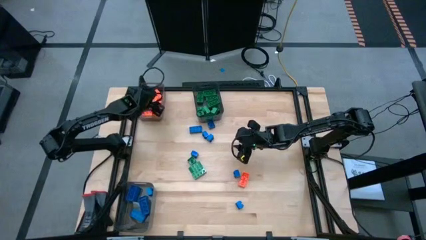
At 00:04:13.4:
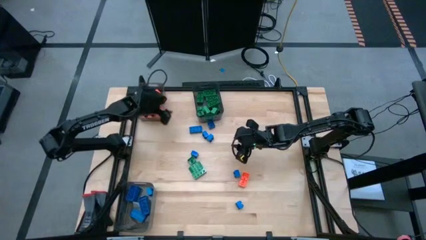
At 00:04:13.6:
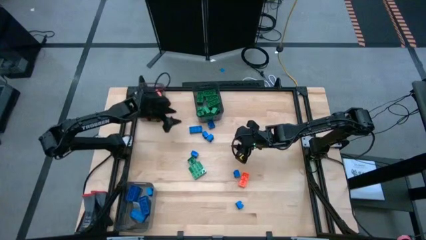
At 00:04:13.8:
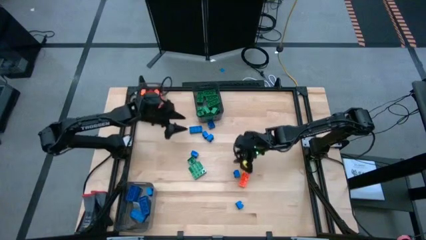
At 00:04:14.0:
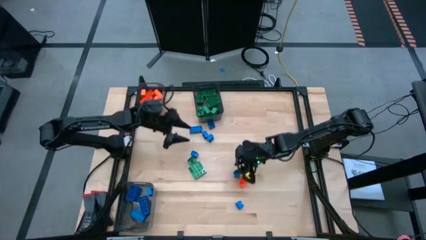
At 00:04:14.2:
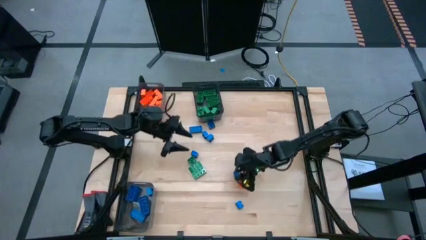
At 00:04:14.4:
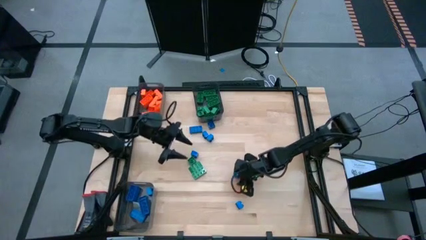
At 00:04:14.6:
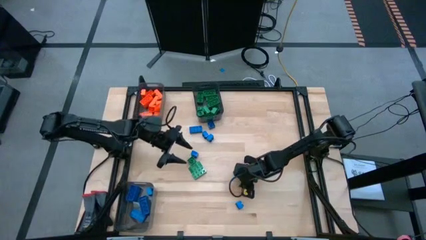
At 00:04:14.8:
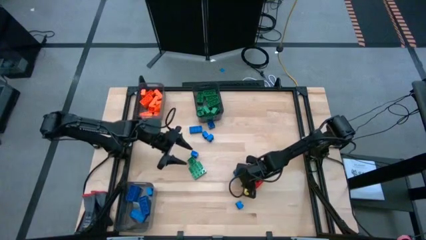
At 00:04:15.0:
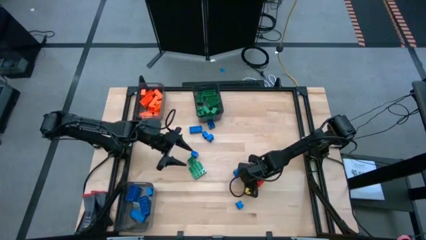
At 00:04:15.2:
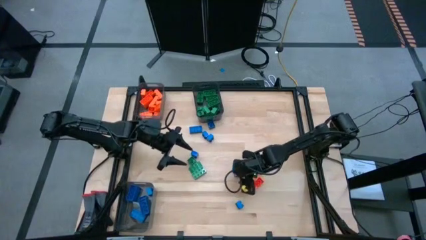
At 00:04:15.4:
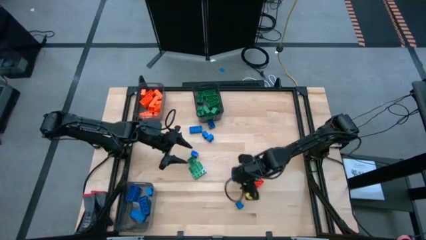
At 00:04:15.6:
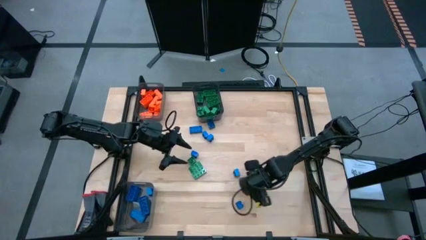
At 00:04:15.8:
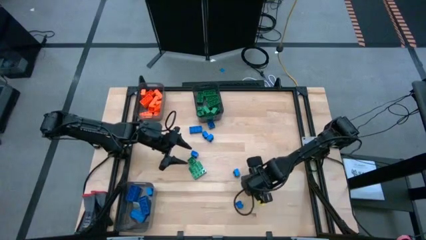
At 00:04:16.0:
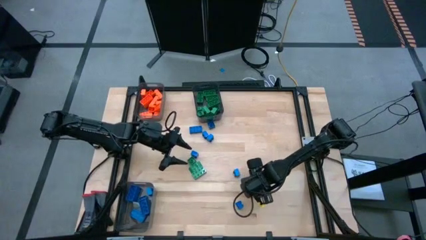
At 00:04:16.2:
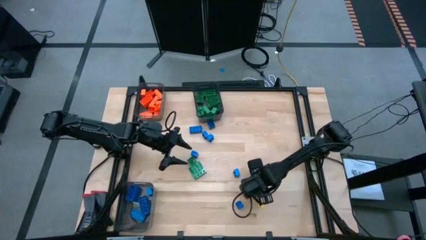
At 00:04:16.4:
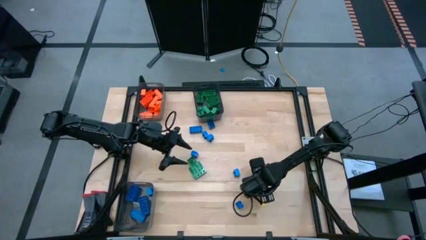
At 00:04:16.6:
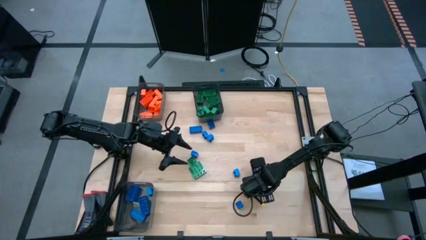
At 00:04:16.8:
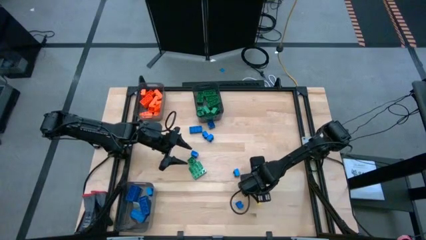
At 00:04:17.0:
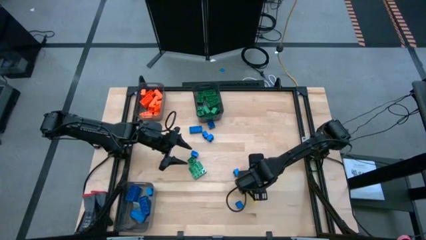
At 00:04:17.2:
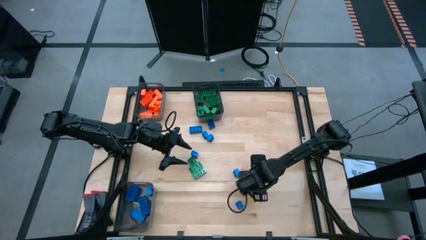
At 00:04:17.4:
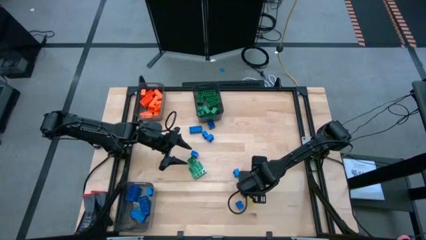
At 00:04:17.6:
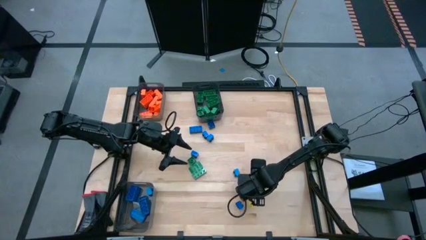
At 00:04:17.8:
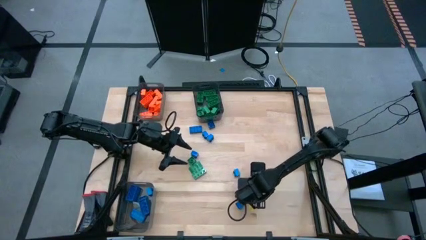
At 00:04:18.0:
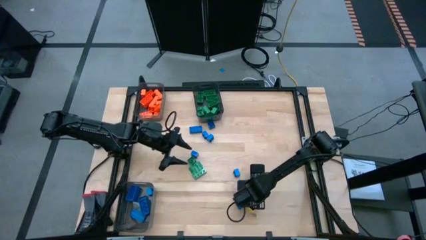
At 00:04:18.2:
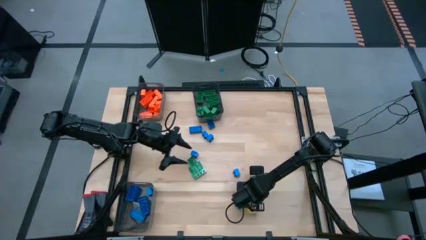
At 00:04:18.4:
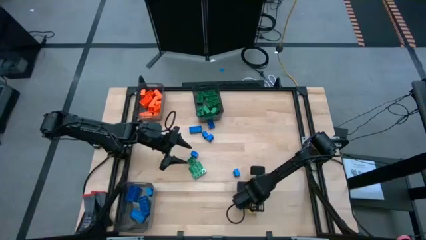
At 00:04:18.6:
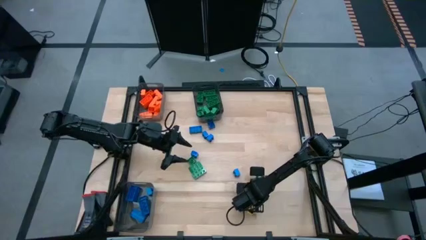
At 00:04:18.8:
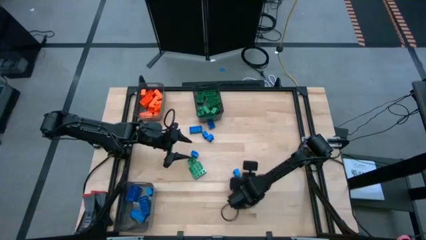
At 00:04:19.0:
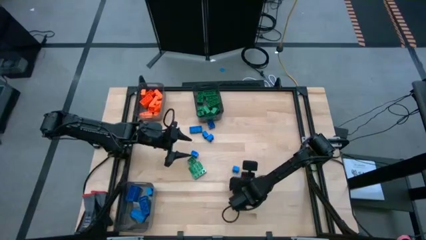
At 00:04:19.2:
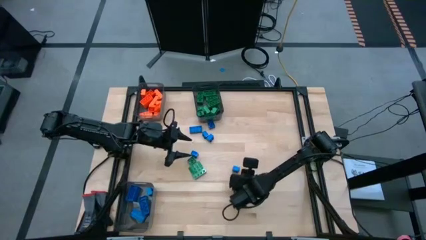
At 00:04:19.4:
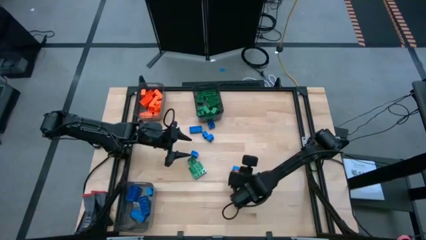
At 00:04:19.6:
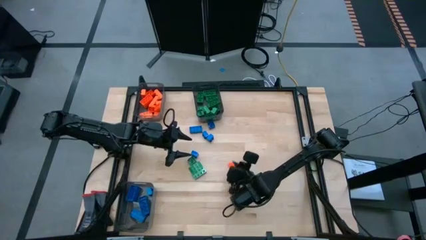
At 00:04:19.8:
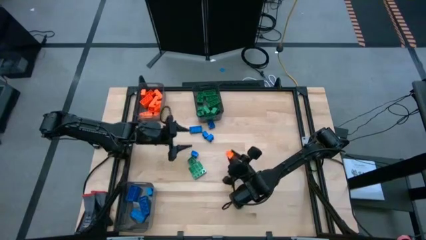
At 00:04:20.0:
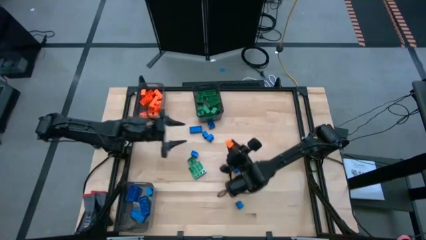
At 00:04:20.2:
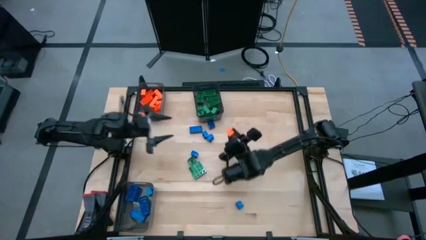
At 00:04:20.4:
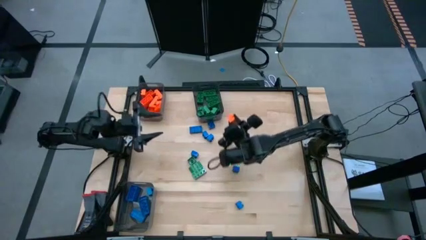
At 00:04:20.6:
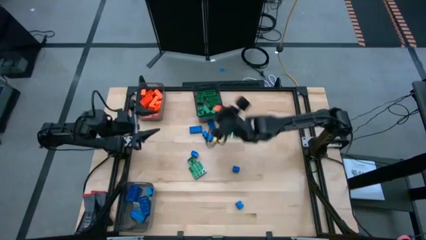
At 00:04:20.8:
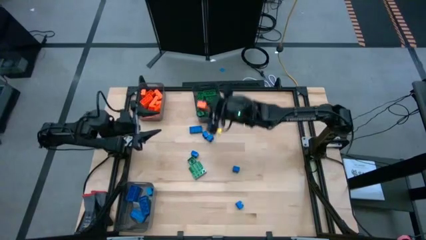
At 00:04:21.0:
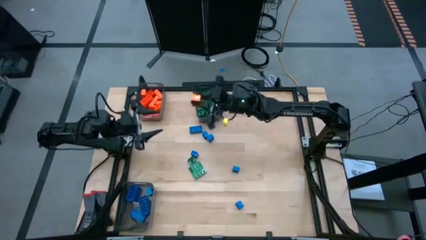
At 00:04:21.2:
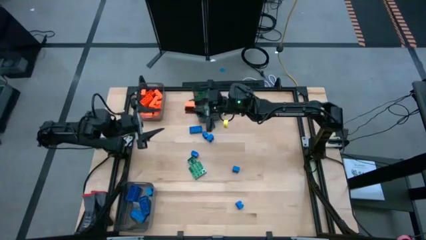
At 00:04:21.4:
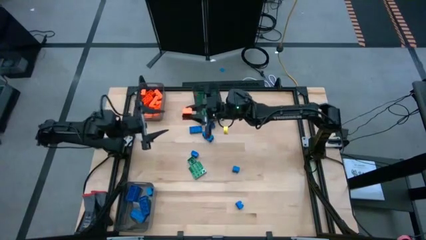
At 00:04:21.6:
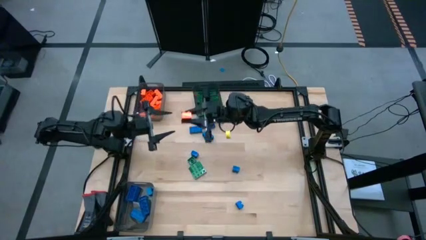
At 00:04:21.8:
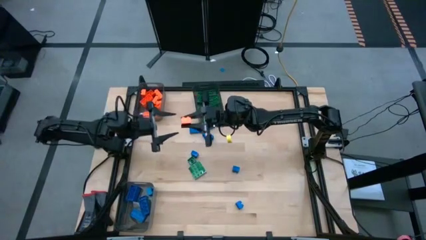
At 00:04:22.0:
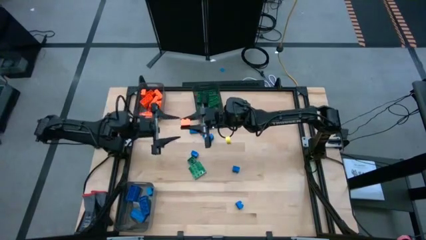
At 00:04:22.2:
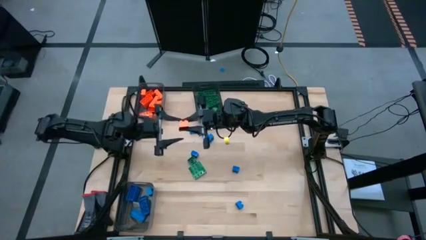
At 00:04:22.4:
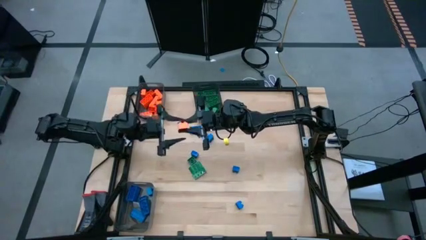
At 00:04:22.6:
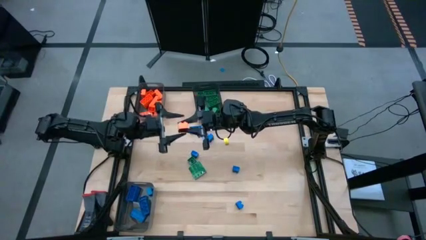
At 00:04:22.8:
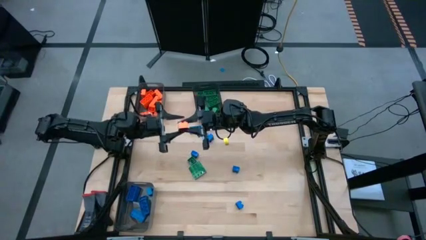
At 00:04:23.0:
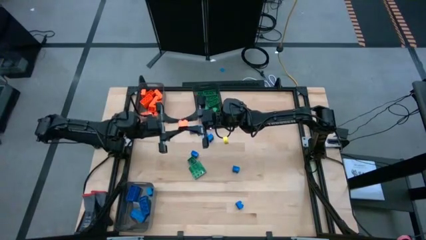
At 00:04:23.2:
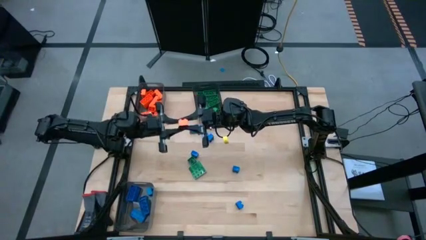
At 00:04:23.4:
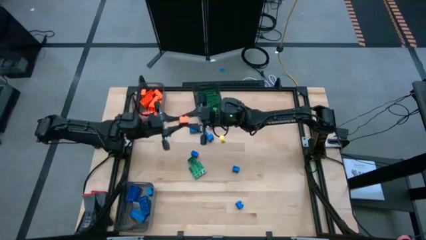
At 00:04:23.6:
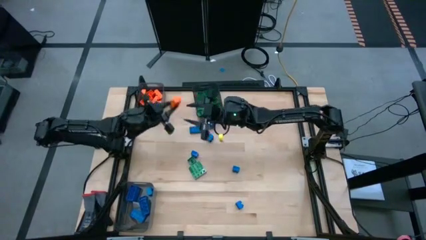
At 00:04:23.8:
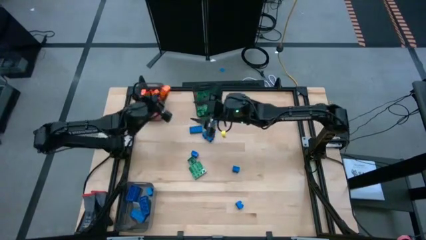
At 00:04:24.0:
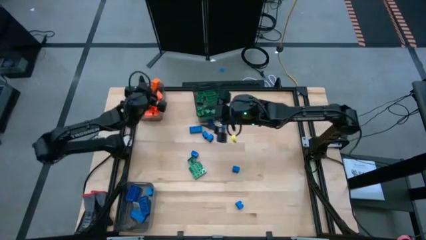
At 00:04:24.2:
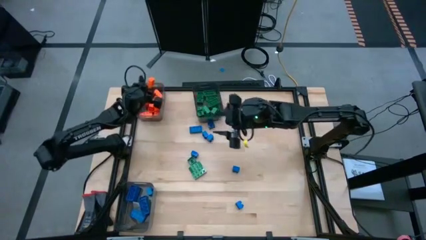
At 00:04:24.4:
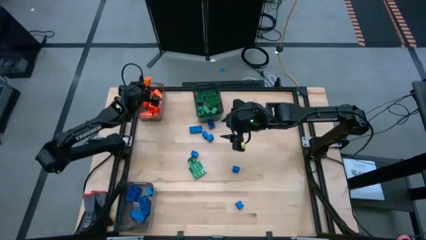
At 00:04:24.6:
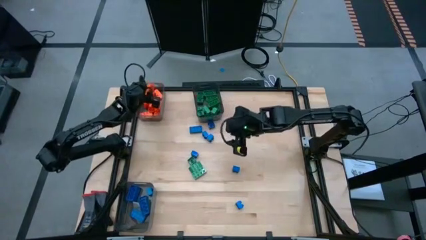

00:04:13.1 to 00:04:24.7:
Task: Sort blocks
Put the orange game piece into the top left black transparent bin

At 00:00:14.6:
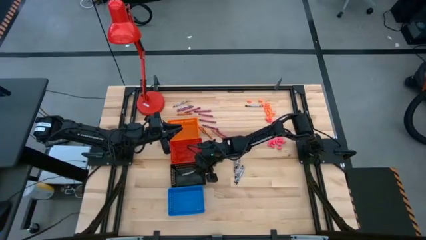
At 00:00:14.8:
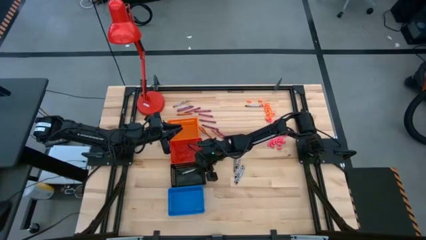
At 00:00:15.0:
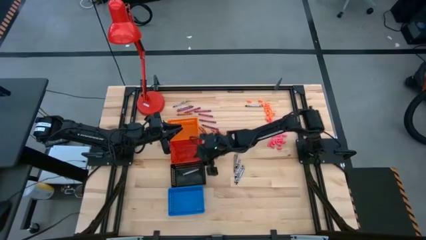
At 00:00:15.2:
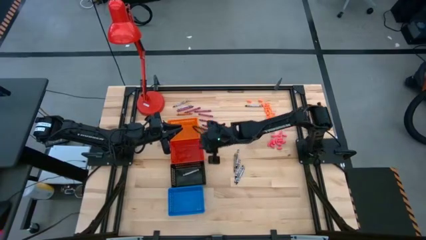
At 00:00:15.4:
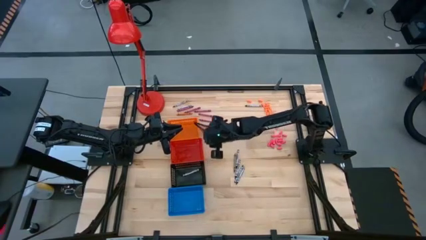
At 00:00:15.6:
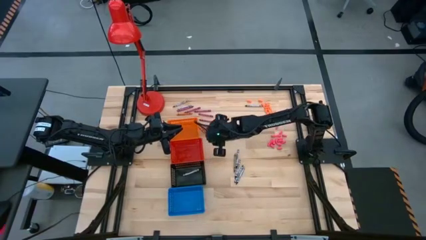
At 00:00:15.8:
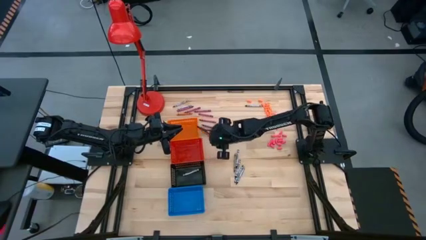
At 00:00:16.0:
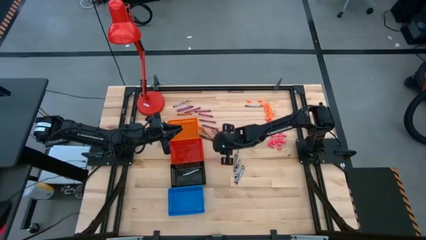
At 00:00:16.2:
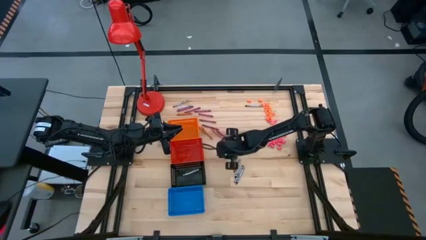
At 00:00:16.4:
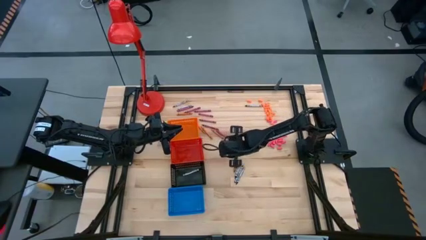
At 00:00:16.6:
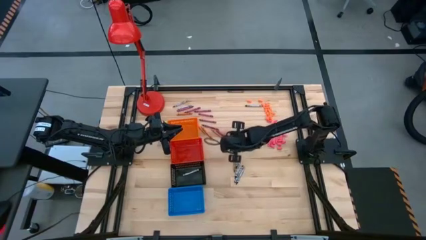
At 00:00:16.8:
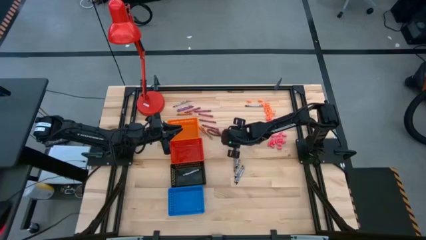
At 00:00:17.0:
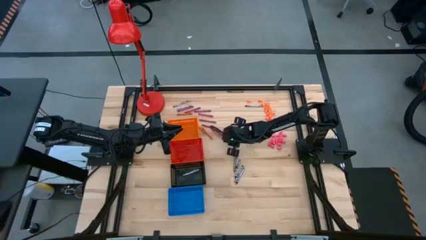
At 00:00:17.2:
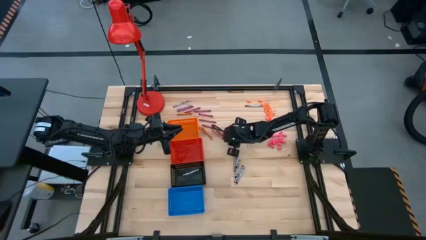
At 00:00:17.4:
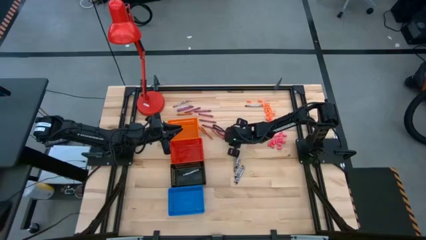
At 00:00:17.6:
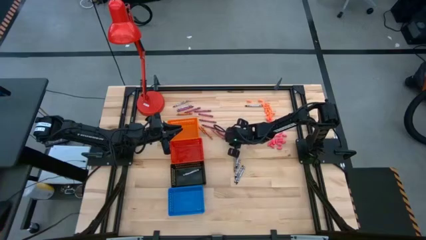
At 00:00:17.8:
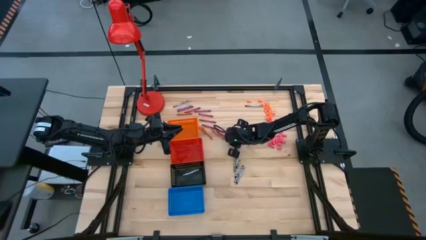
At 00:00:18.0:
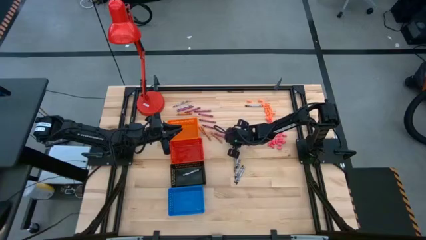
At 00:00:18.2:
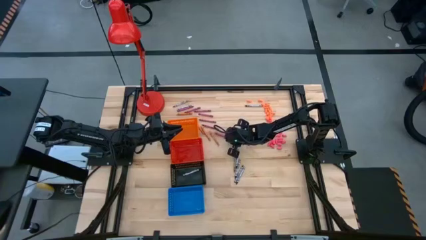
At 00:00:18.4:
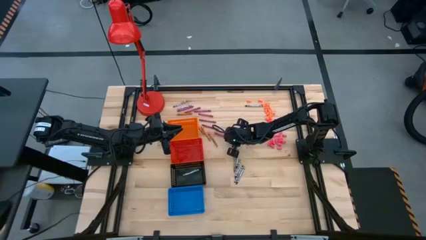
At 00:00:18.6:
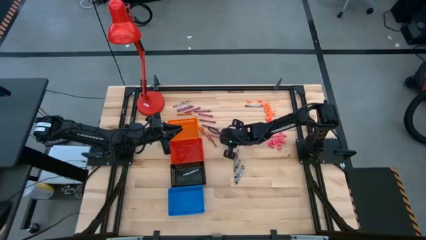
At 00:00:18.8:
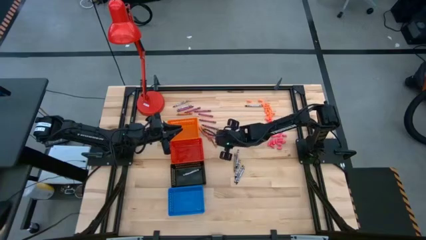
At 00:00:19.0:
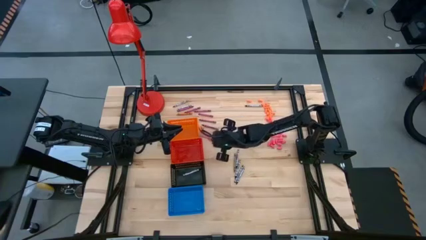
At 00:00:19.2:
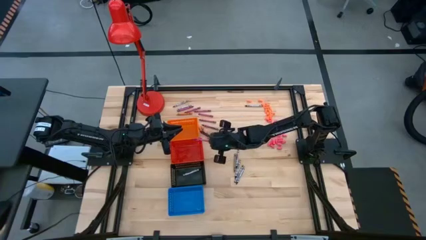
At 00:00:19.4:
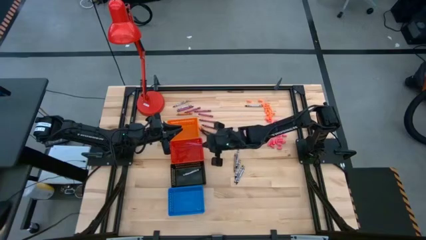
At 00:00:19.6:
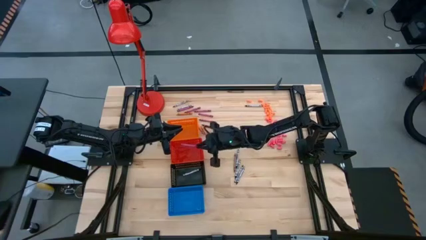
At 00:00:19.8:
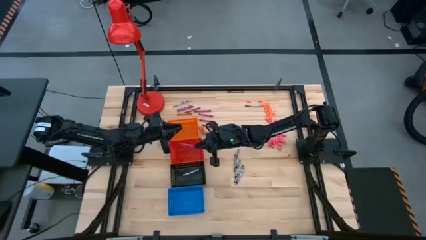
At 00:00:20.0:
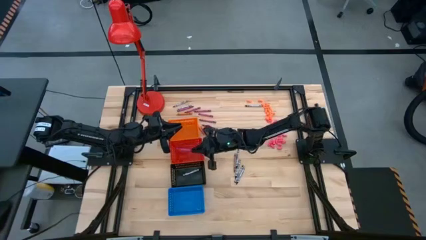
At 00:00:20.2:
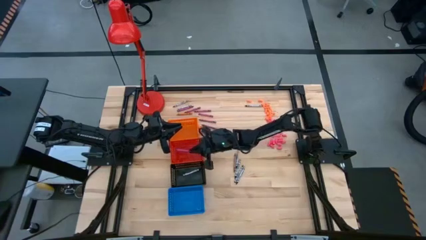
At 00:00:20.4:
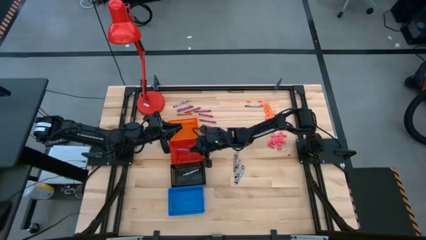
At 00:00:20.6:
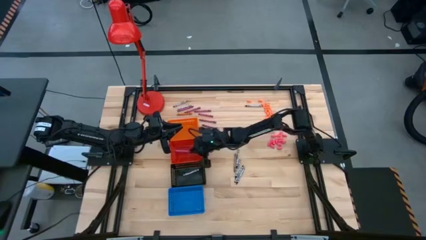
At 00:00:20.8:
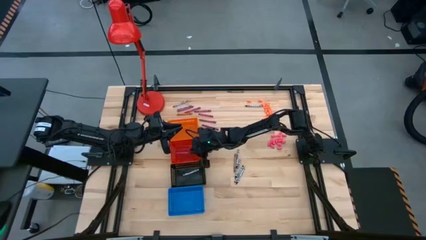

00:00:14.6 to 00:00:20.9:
Task: Sort crayons
Put the red crayon into the red basket
